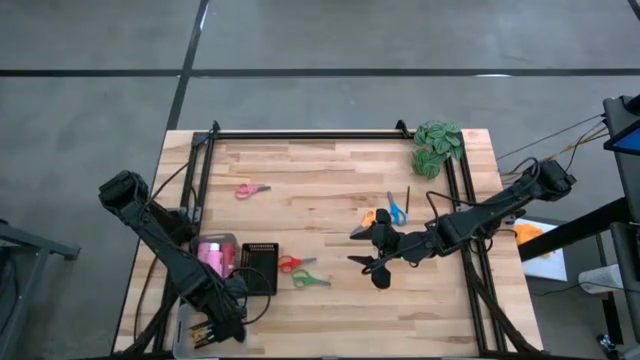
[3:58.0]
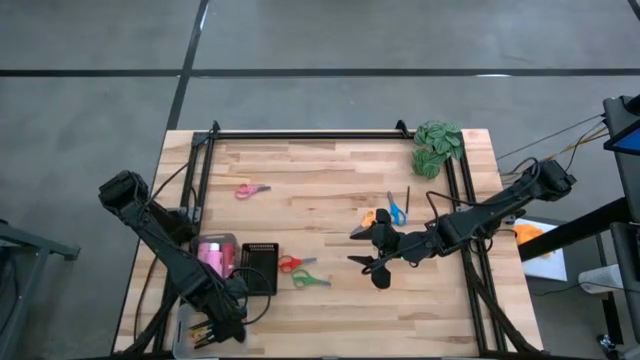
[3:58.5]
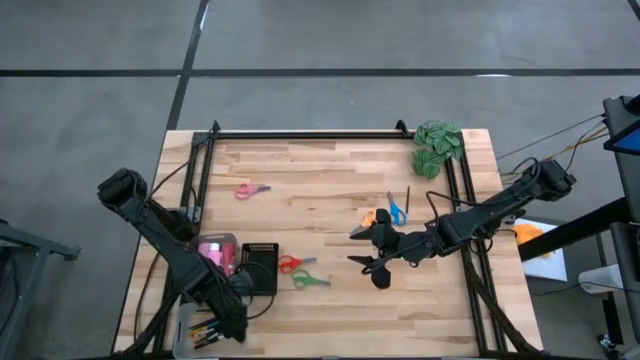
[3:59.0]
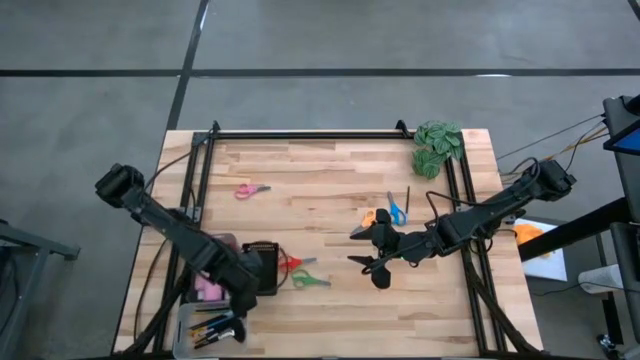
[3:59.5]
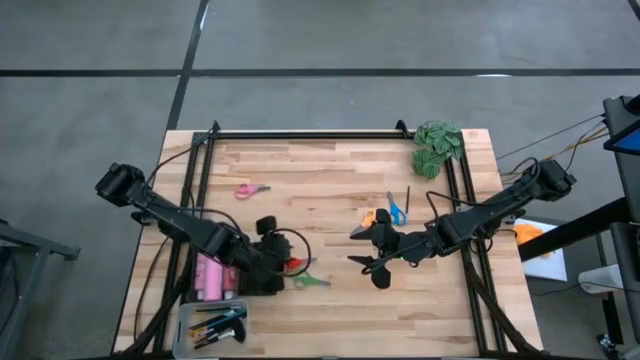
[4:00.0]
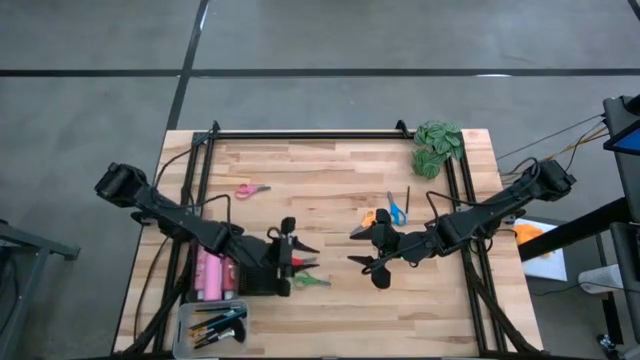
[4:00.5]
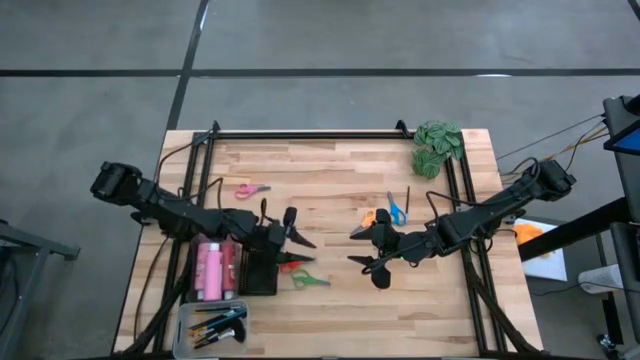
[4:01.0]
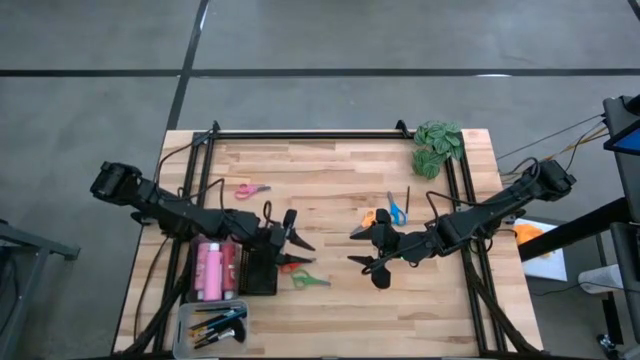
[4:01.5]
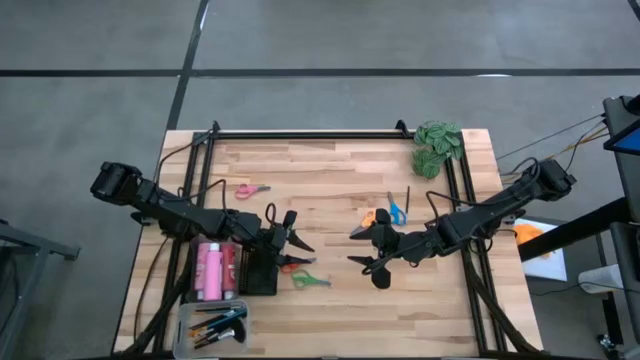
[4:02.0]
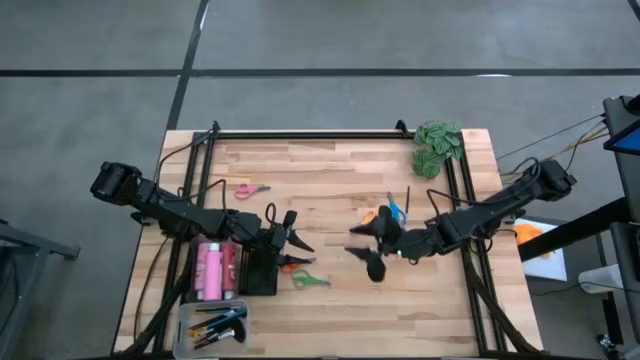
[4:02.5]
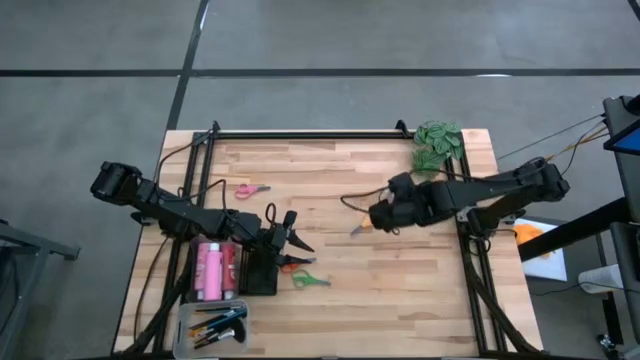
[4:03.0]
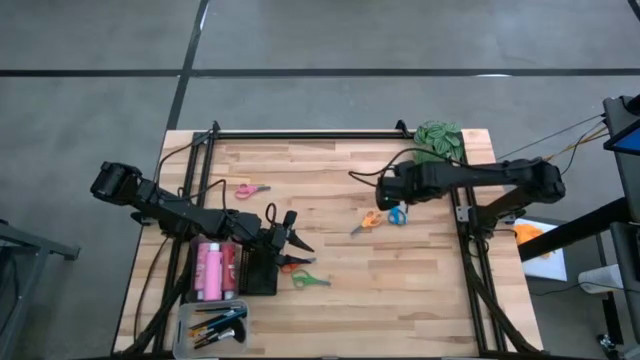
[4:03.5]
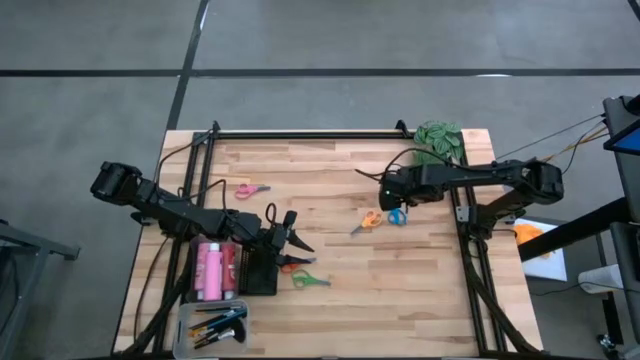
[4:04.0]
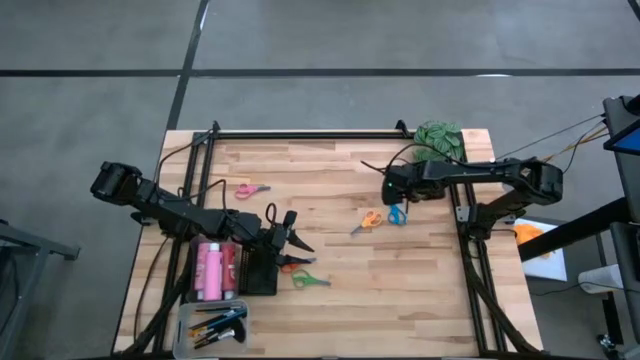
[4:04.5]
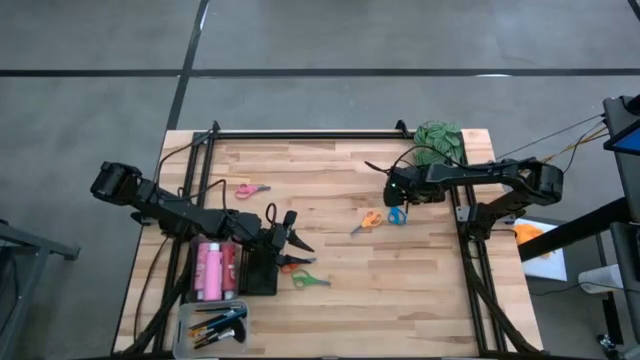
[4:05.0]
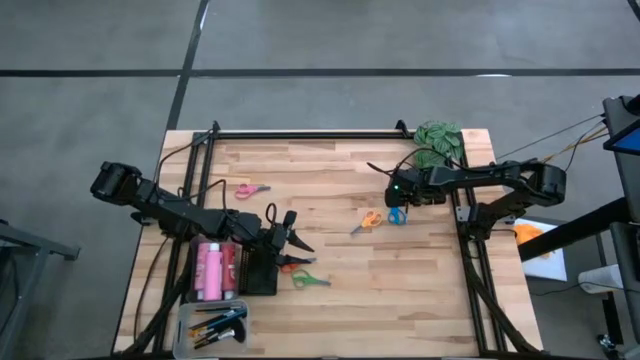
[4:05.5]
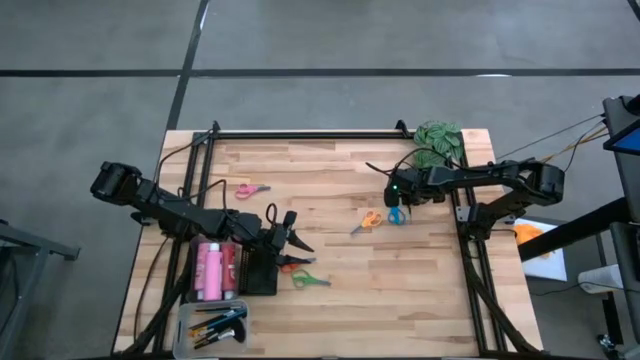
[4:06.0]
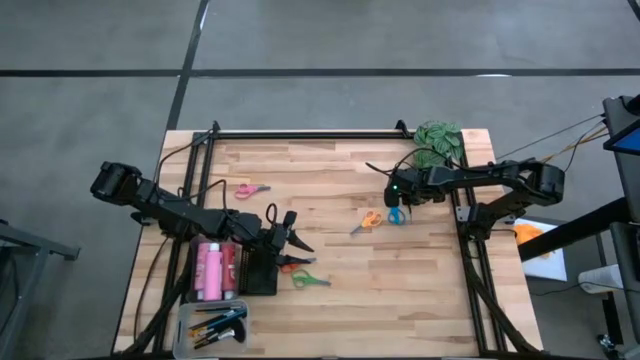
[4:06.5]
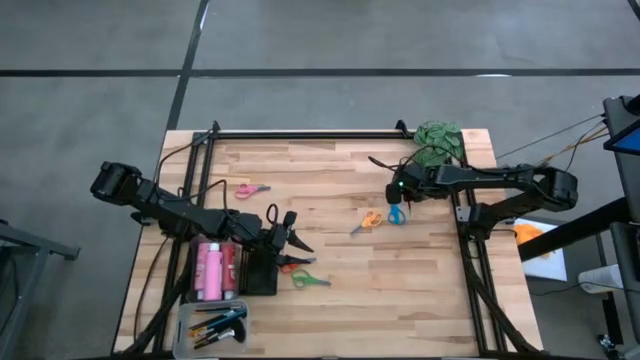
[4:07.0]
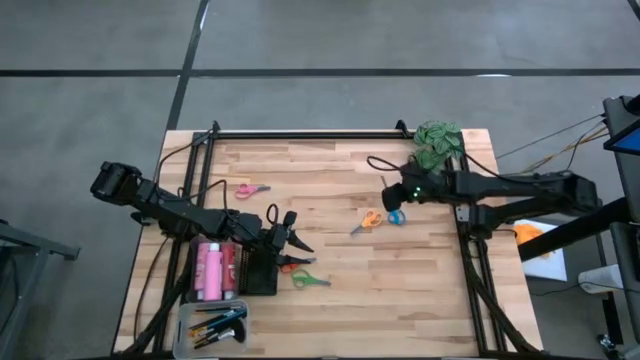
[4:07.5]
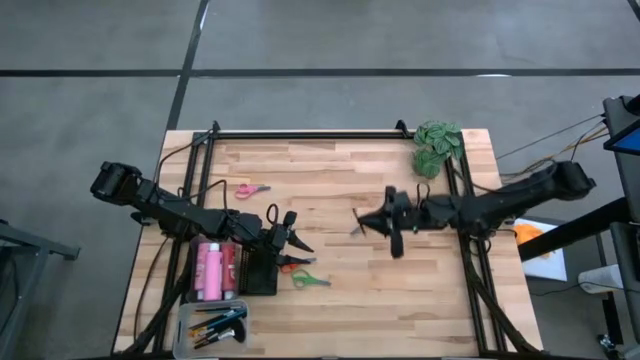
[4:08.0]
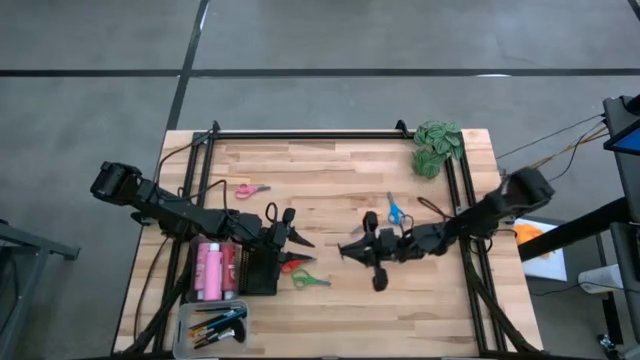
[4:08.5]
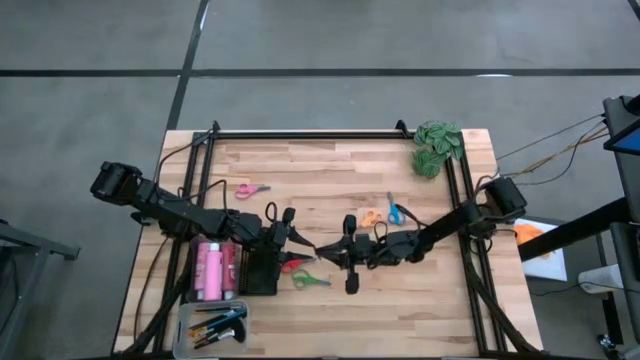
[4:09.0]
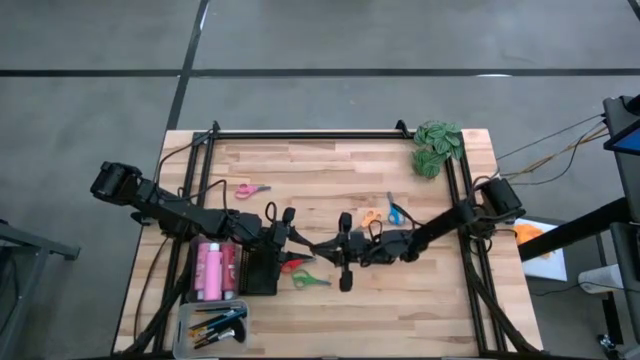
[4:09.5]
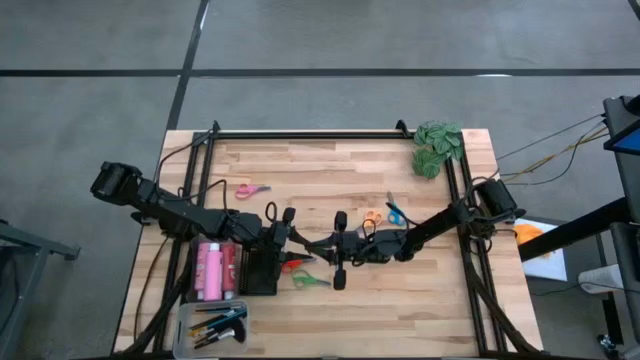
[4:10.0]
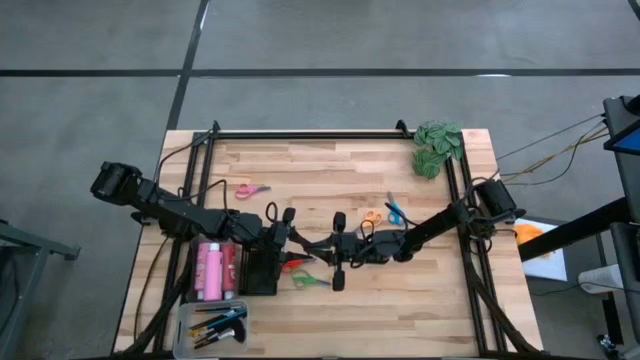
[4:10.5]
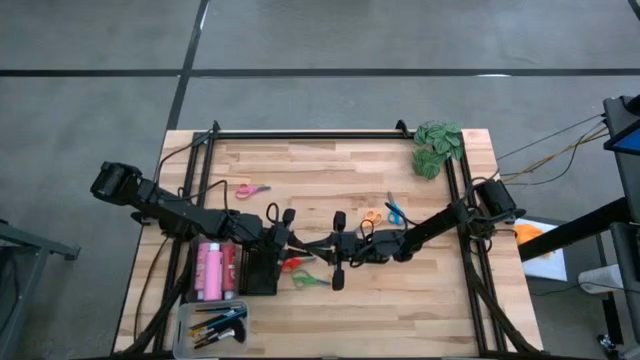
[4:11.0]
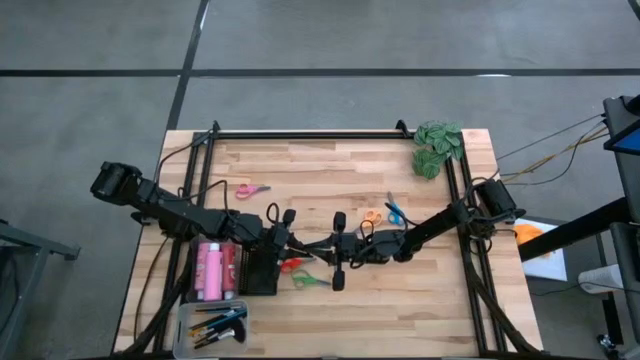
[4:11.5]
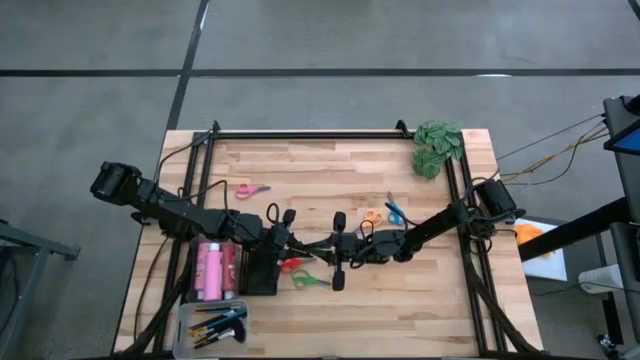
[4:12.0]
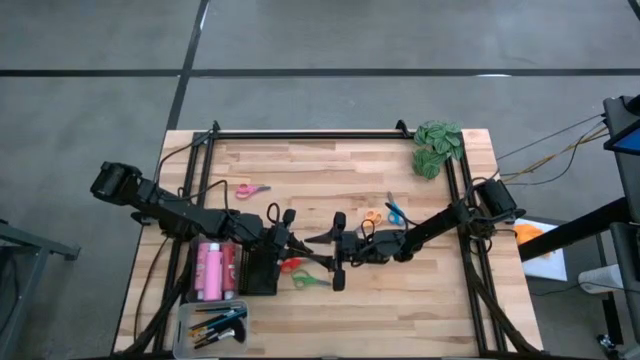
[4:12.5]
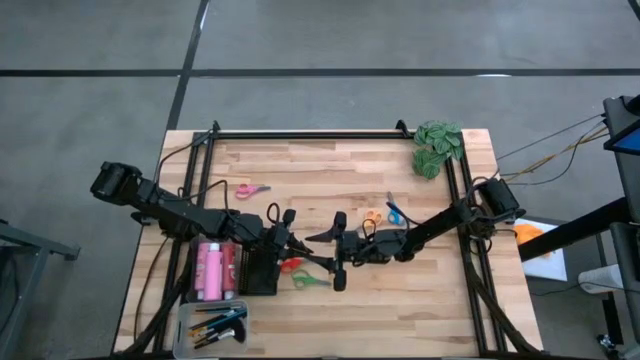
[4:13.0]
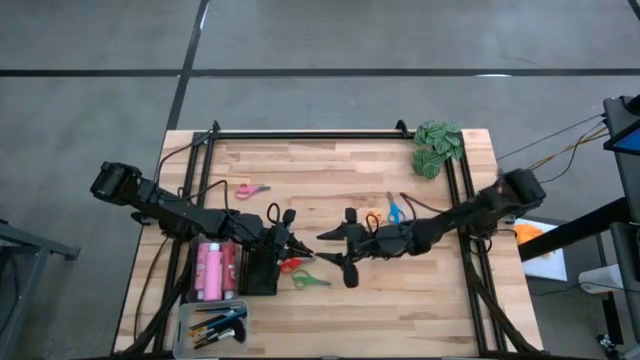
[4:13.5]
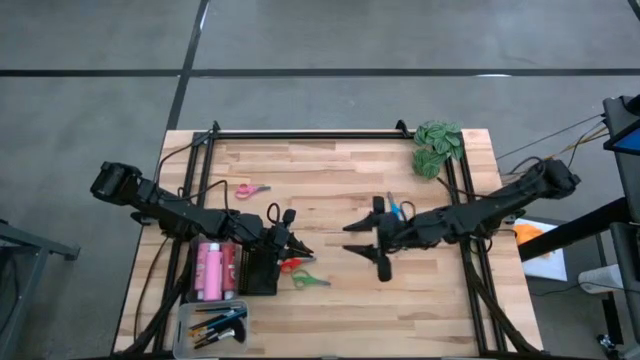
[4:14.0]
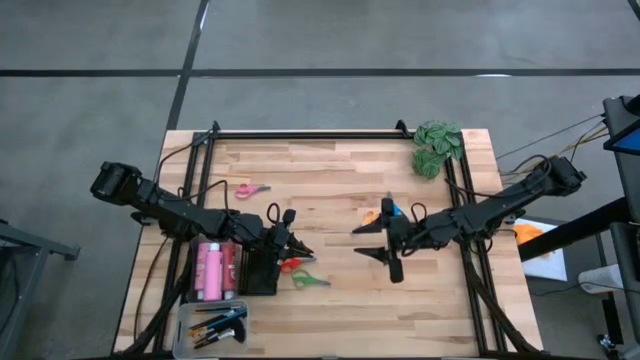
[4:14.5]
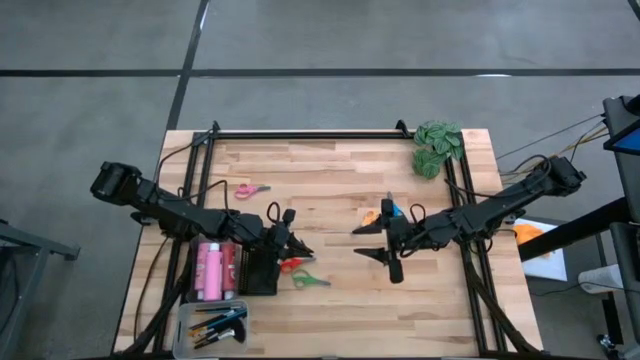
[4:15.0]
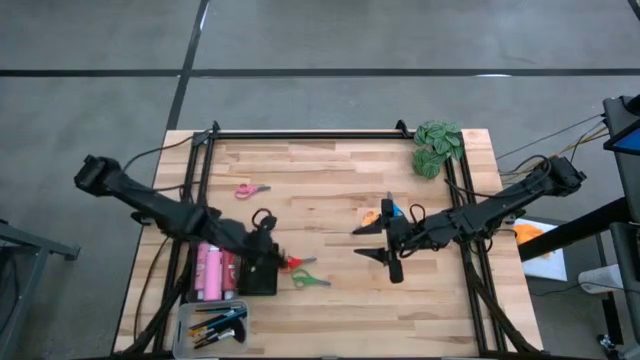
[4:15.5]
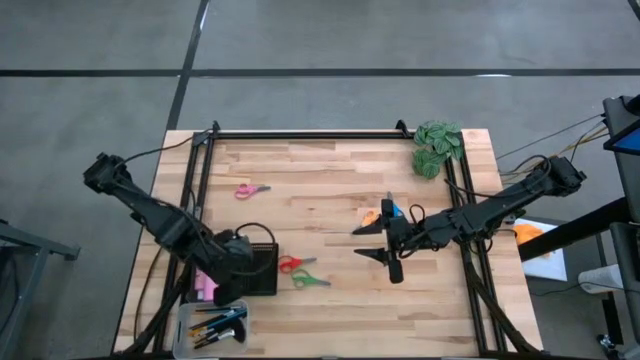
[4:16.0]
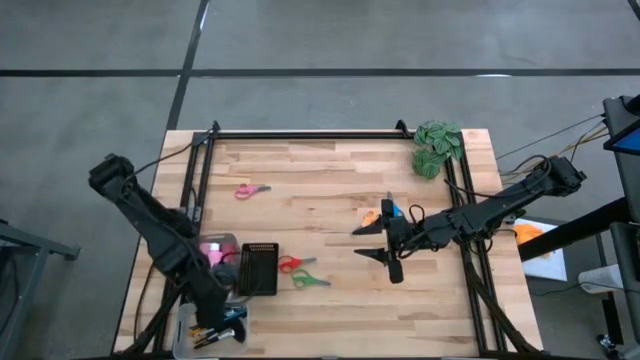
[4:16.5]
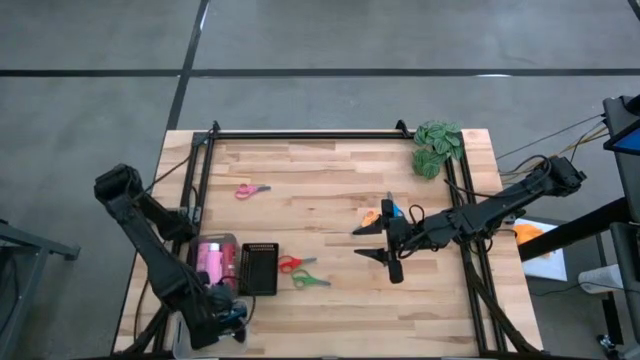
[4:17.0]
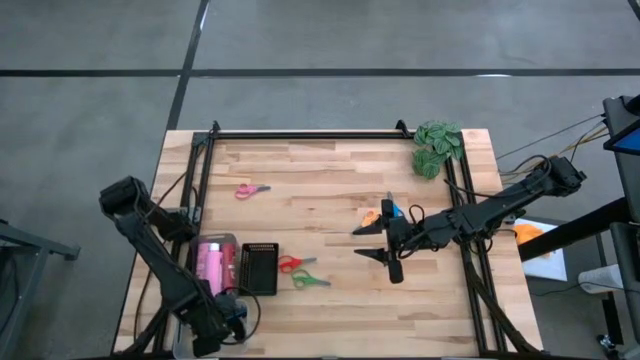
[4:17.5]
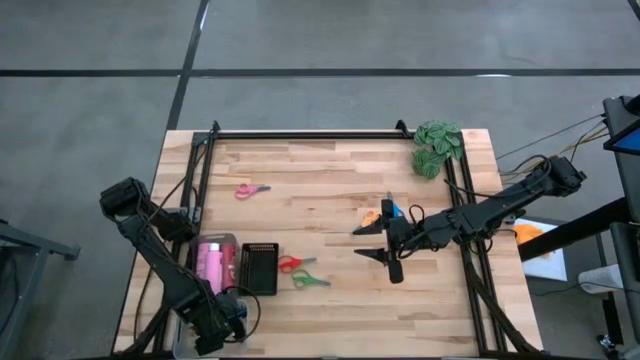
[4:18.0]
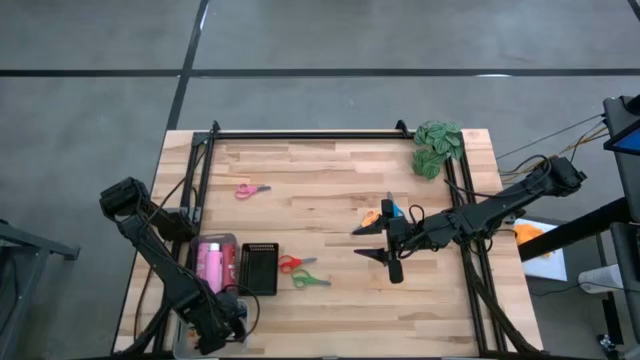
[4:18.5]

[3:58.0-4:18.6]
Task: Pick & Place Paint Supplies
Put the silver paint brush into the transparent bin

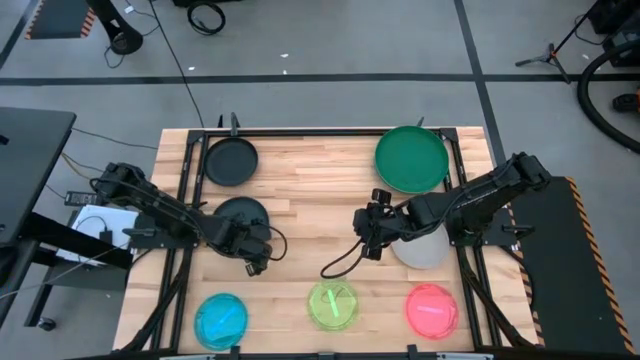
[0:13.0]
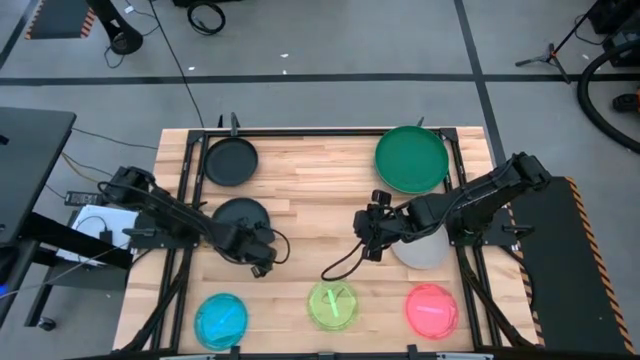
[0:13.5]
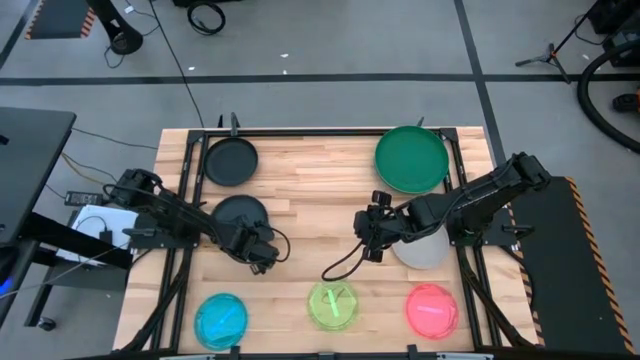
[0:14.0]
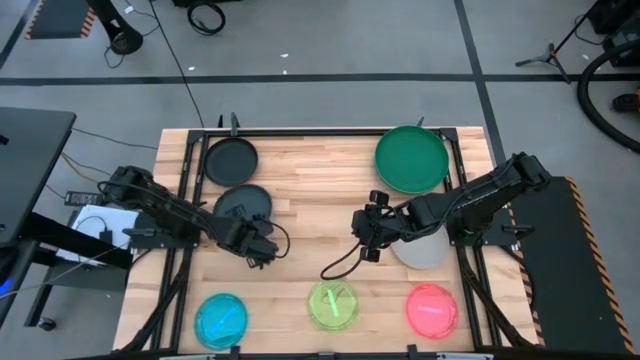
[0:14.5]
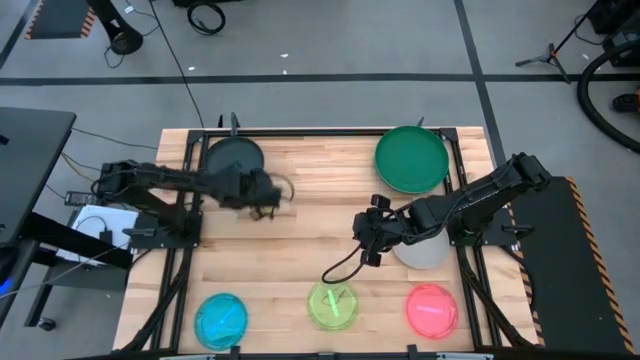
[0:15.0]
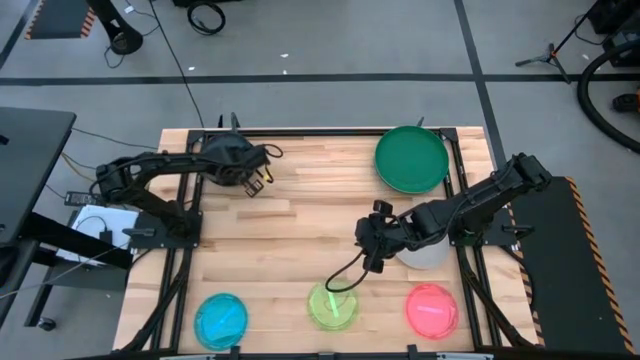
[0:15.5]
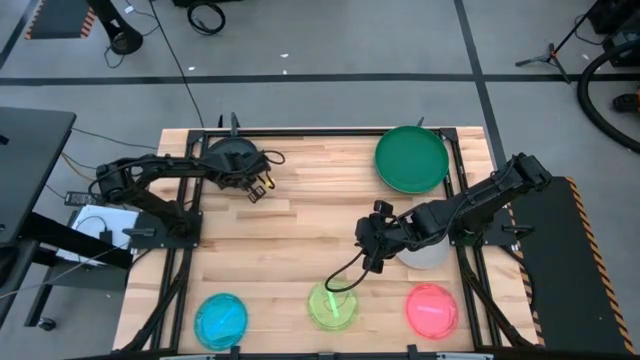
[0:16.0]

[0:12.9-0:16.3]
Task: Stack plastic plates
Stack the bottom black plate on top of the black plate
